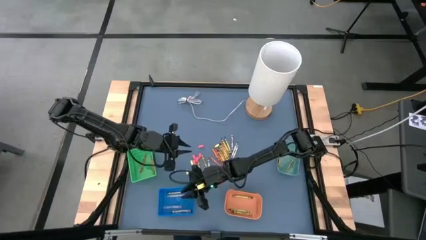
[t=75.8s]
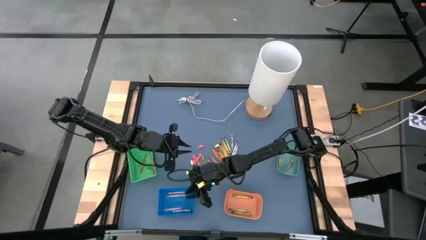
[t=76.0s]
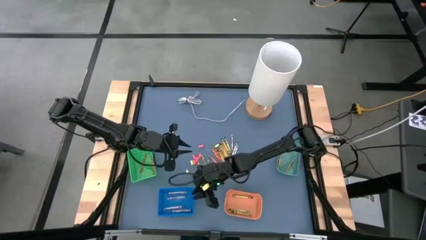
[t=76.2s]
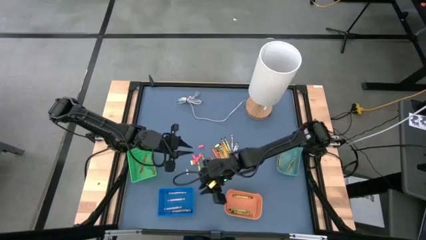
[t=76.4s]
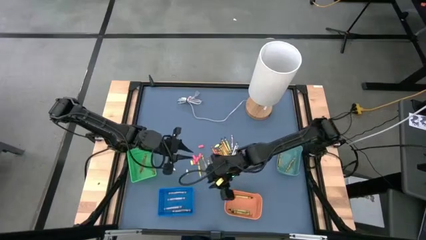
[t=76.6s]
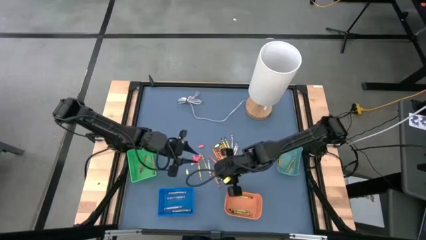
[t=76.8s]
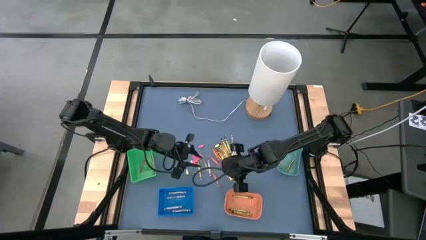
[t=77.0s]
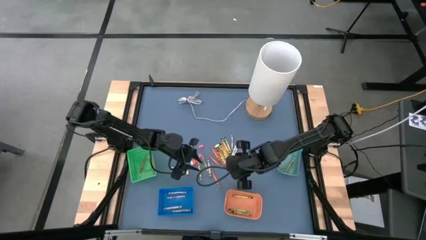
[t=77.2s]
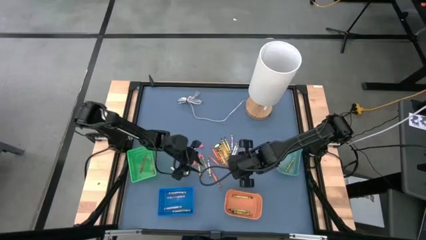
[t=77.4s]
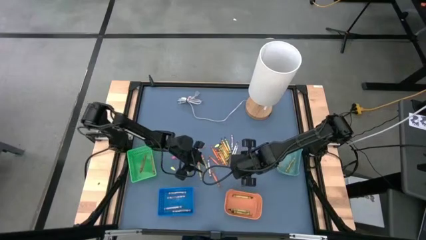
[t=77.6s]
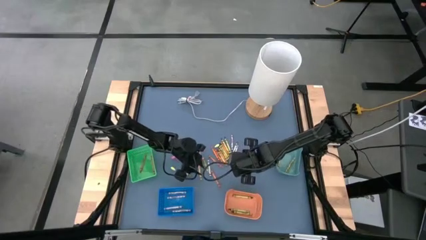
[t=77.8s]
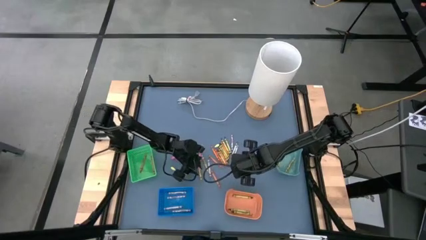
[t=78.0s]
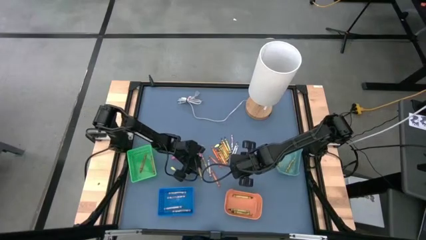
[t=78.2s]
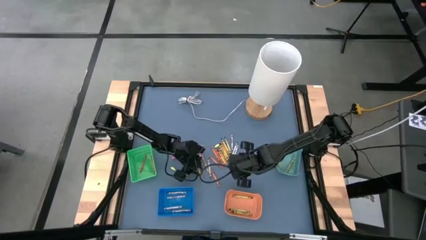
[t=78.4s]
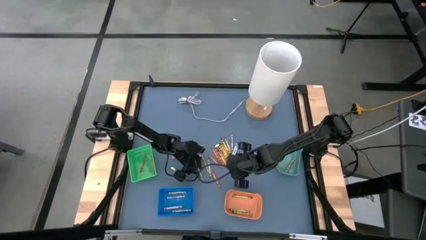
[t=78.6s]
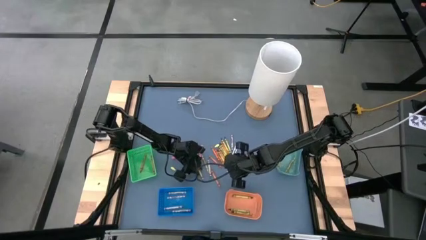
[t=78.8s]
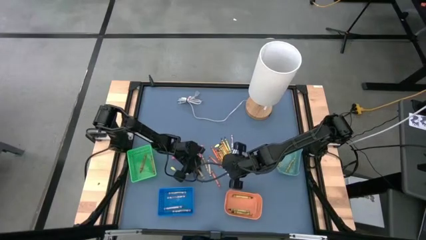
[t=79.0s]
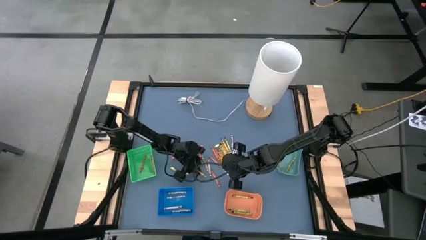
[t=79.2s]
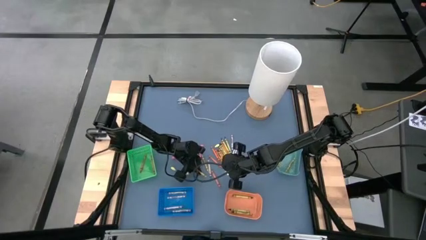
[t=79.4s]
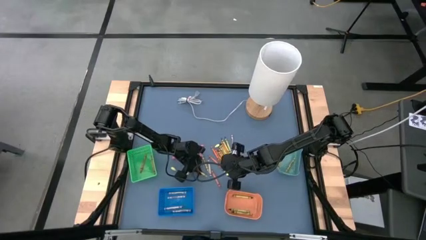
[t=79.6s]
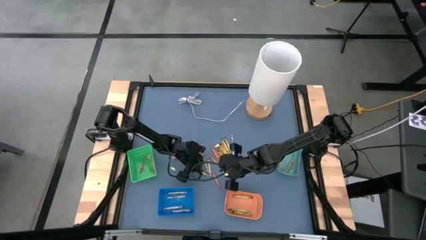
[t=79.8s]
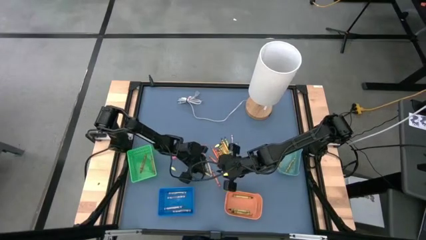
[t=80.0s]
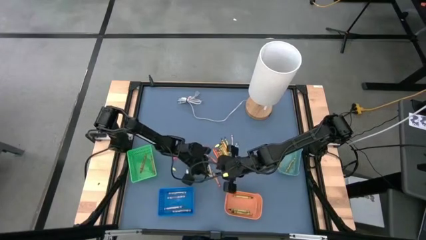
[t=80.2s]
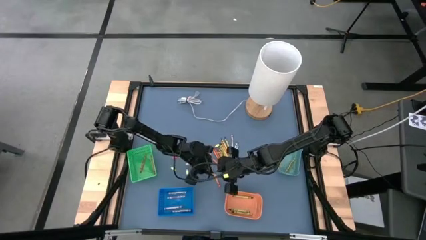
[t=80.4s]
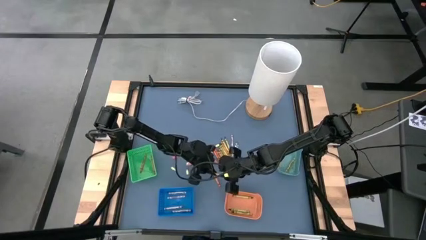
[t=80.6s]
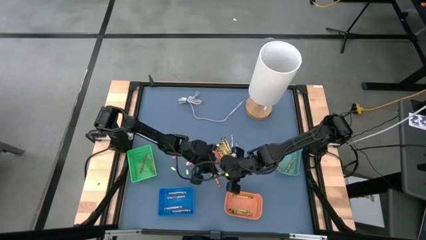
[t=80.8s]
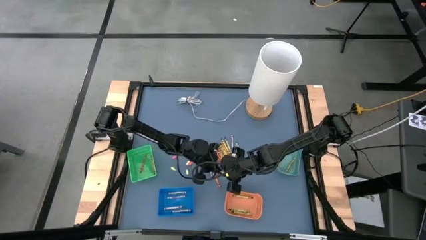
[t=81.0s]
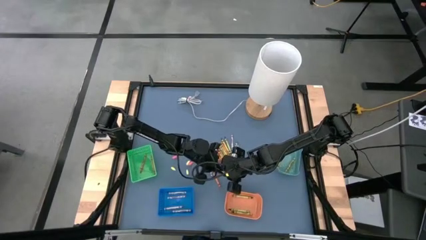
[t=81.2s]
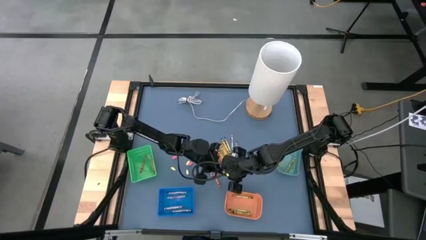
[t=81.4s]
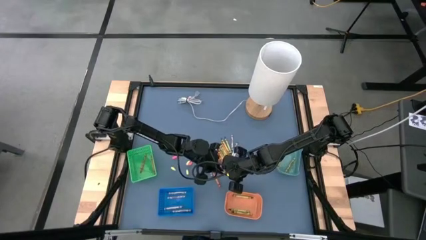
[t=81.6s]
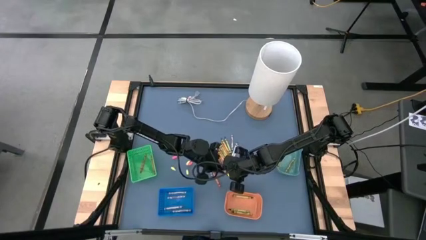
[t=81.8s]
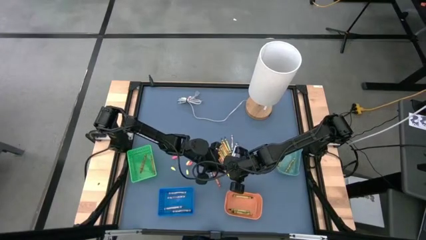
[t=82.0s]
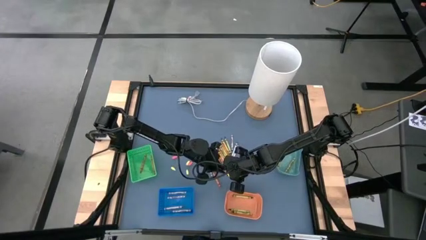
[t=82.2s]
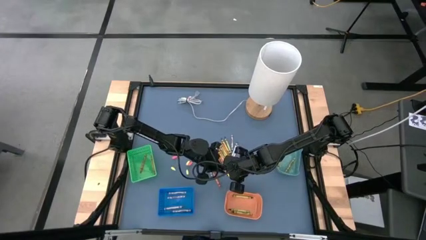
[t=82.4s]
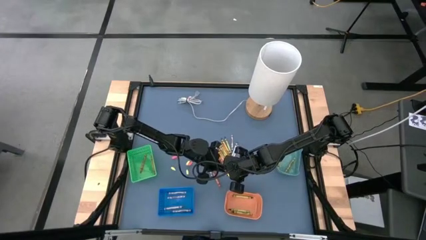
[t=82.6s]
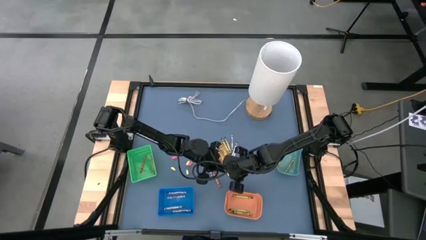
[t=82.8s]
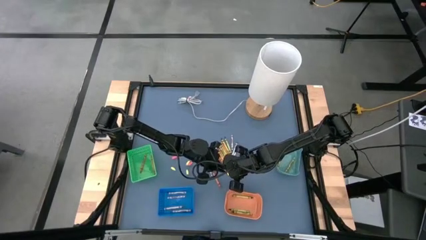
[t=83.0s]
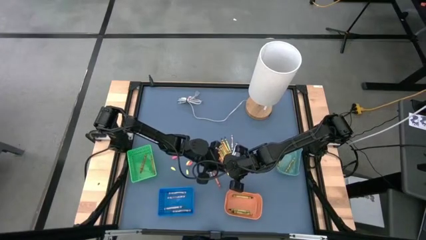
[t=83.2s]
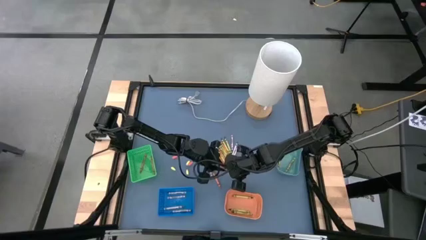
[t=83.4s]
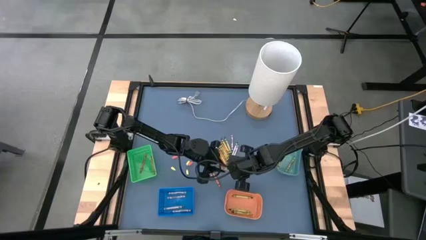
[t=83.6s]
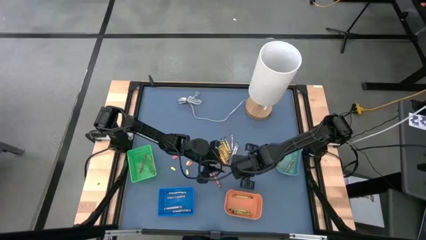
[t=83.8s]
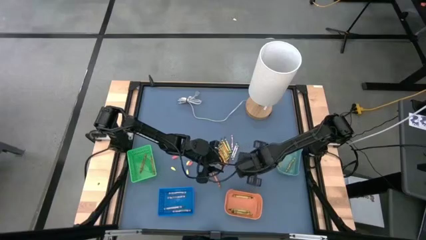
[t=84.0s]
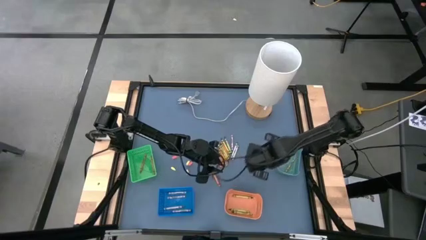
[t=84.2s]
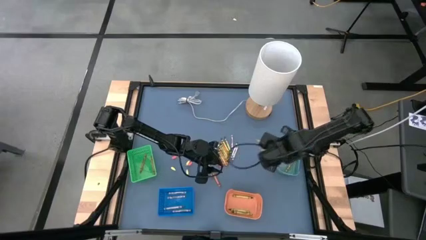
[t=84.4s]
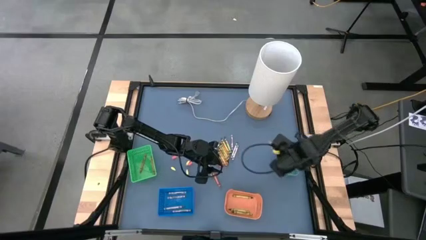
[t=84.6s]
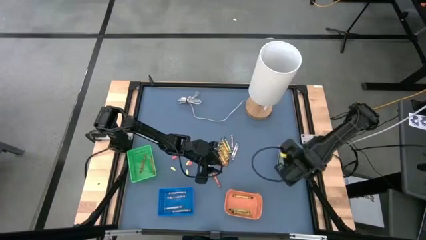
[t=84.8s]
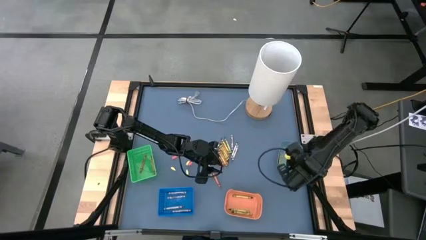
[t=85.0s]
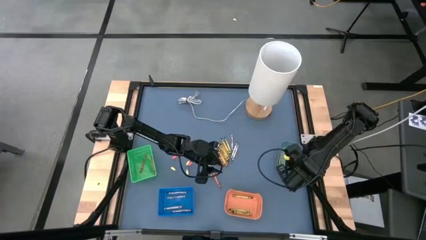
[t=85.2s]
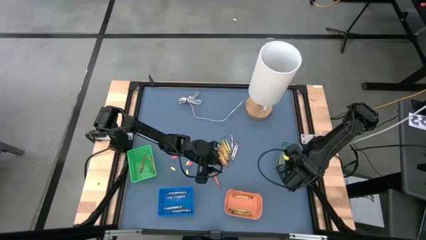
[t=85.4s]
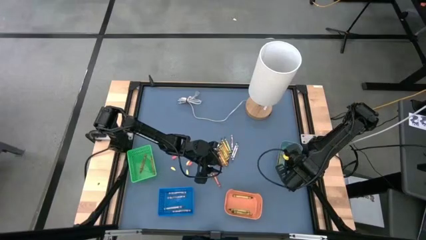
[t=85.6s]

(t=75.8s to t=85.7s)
Task: Sort crayons
Put the yellow crayon into the dark green bin

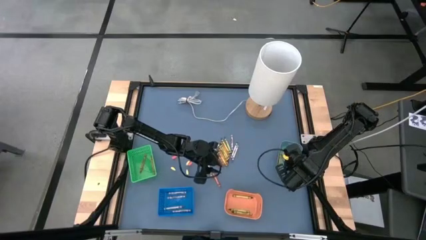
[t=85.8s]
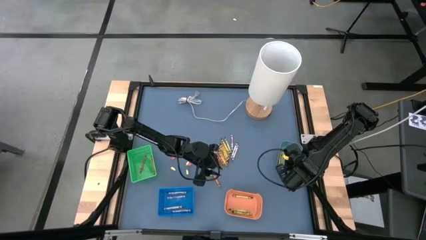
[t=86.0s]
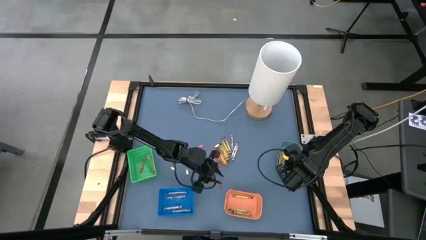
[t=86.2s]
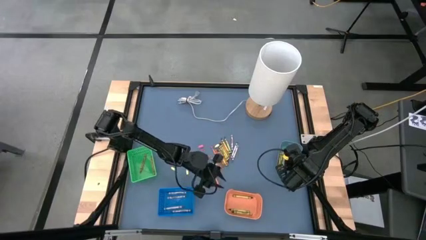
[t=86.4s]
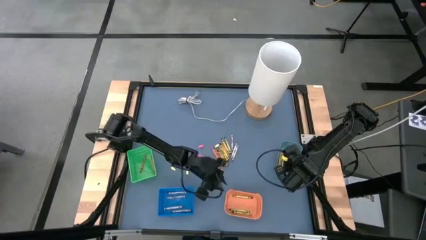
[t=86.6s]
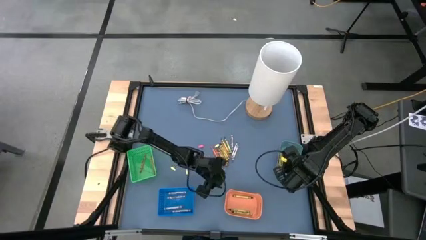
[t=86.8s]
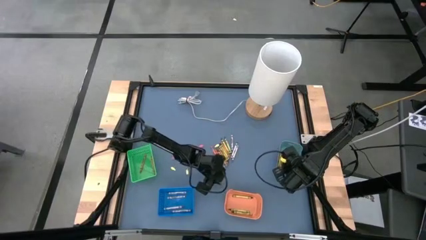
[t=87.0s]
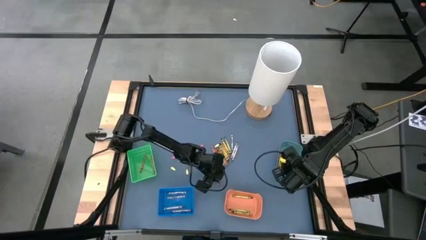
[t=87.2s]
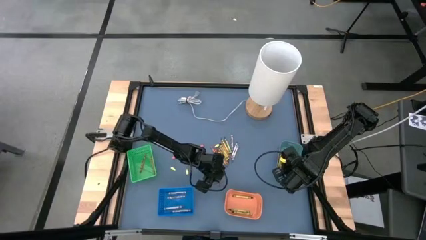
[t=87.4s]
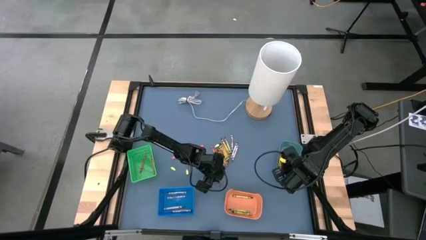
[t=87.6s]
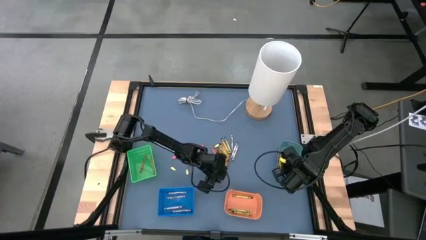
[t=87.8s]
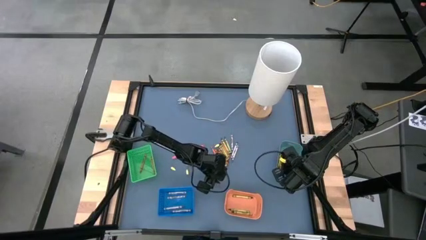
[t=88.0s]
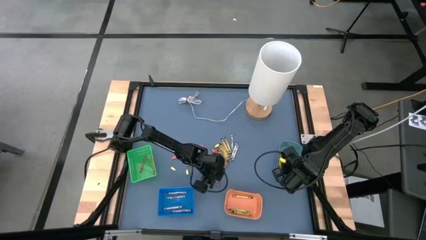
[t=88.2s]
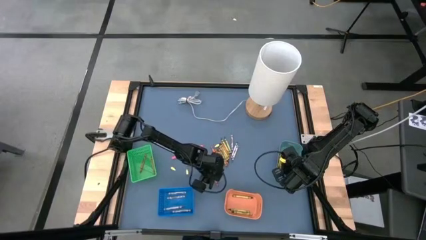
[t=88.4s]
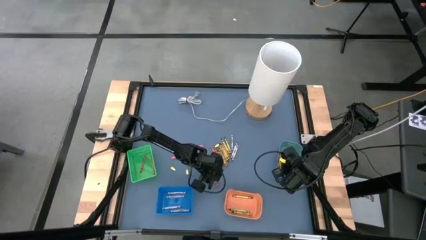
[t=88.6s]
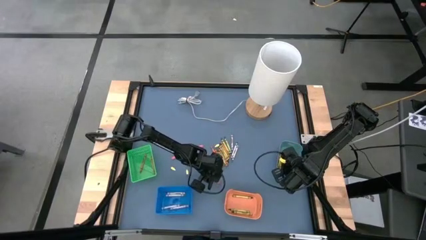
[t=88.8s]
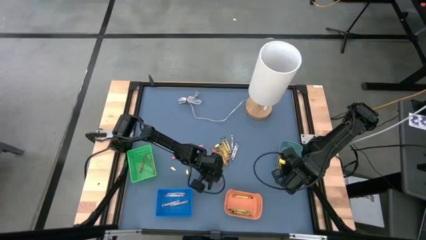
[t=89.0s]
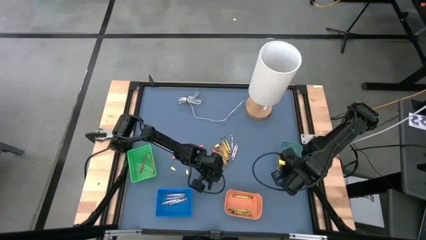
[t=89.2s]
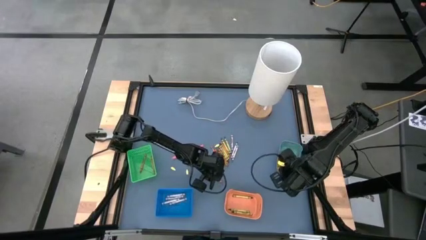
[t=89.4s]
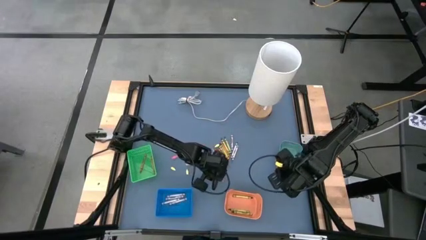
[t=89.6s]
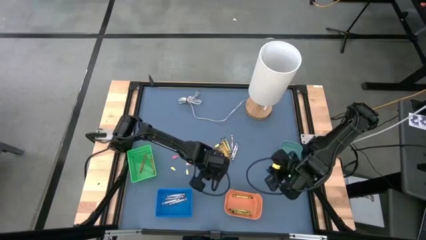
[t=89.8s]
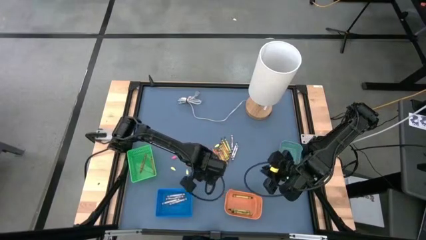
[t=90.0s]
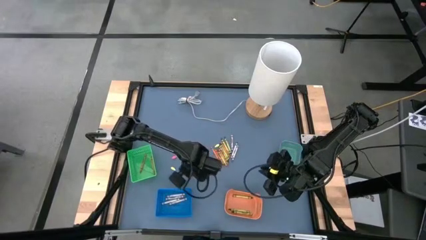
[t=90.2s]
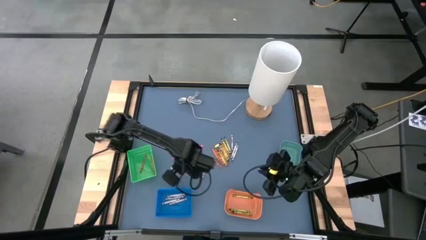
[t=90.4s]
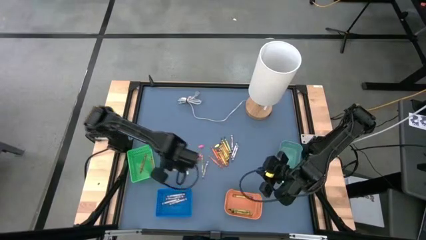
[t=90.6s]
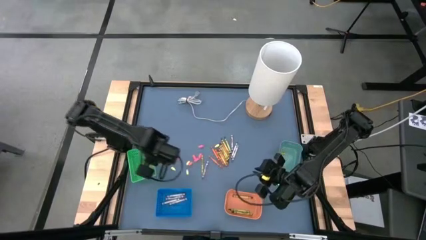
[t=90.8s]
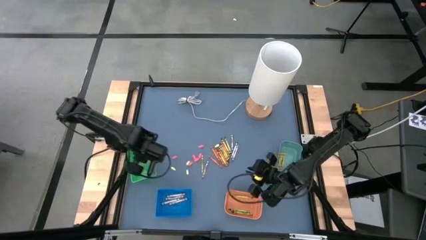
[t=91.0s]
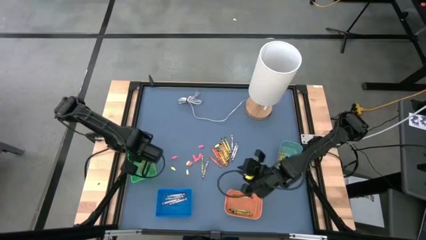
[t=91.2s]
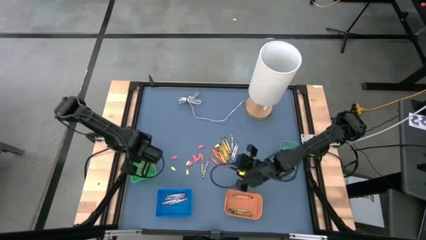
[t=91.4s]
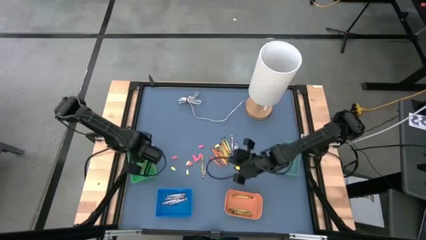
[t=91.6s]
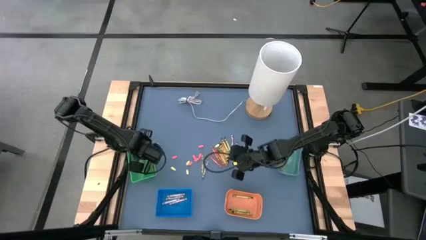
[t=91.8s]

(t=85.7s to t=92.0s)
Put the orange crayon into the green bin
